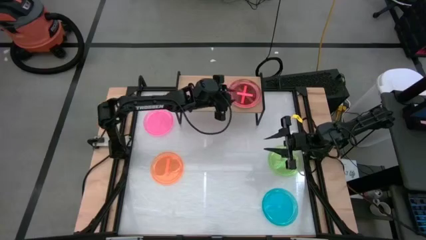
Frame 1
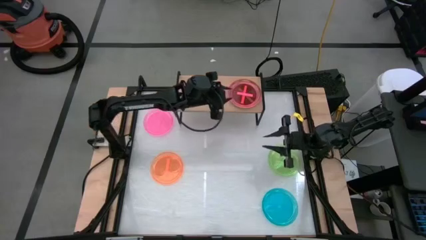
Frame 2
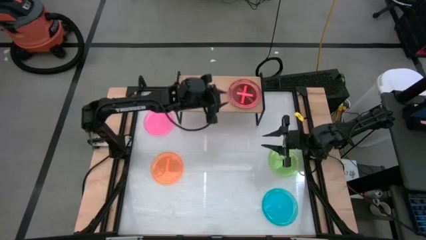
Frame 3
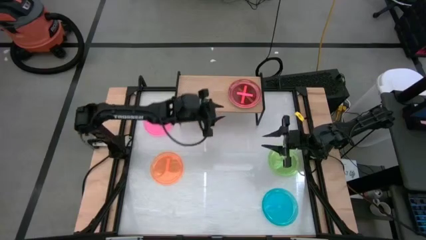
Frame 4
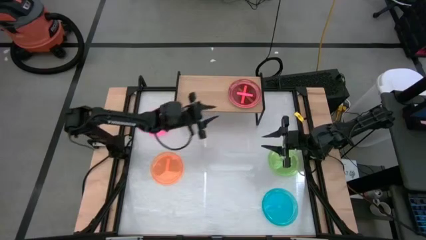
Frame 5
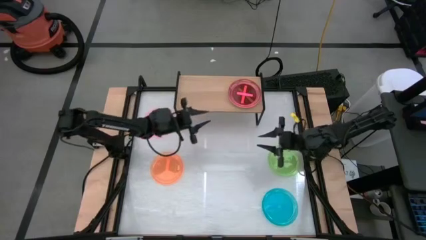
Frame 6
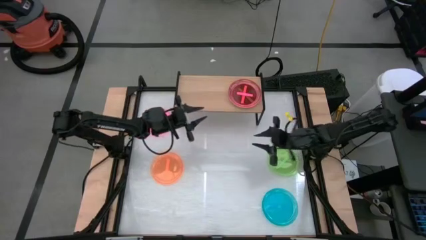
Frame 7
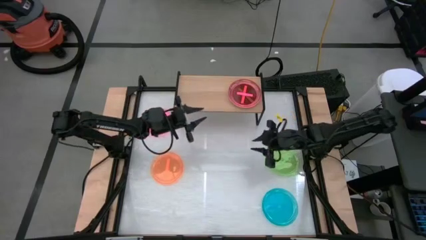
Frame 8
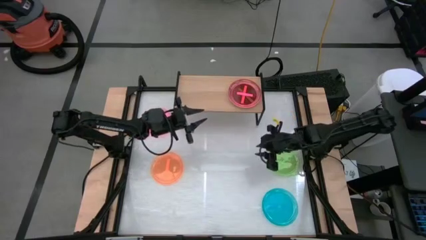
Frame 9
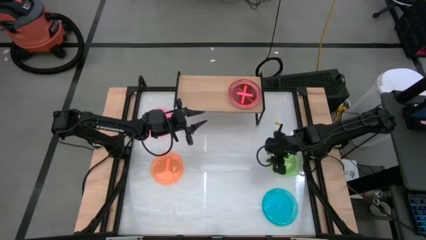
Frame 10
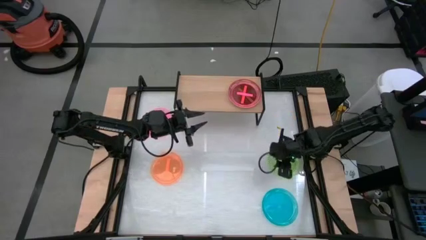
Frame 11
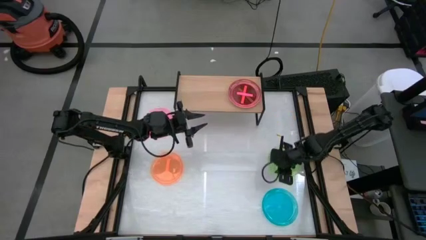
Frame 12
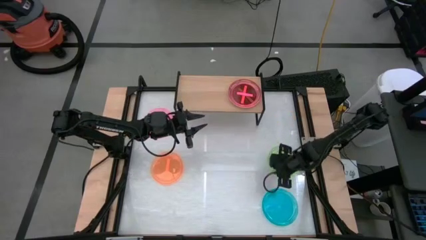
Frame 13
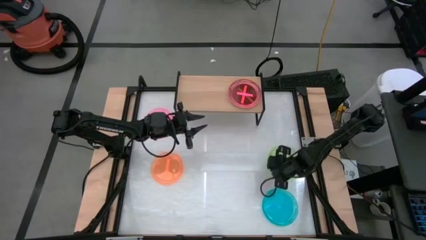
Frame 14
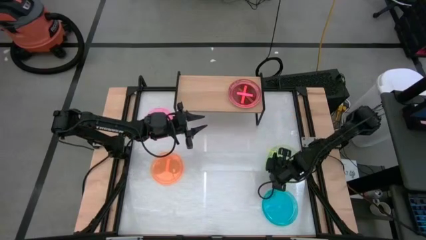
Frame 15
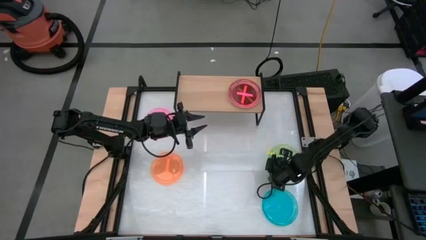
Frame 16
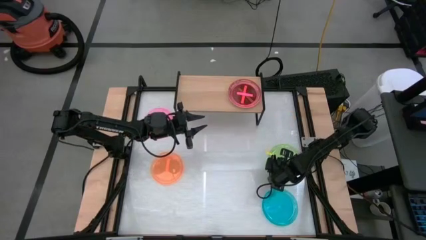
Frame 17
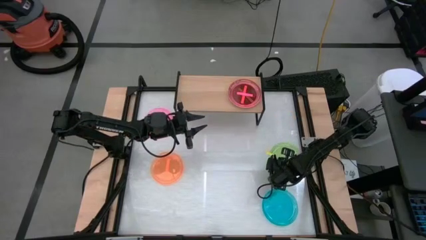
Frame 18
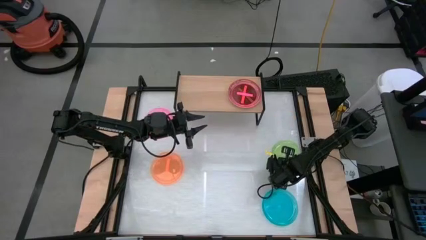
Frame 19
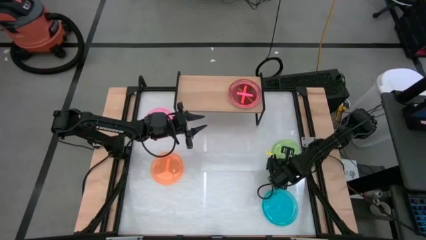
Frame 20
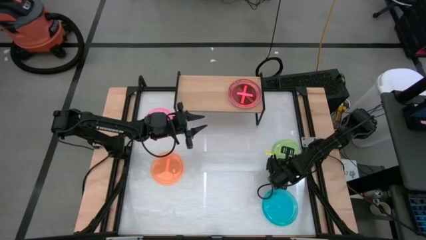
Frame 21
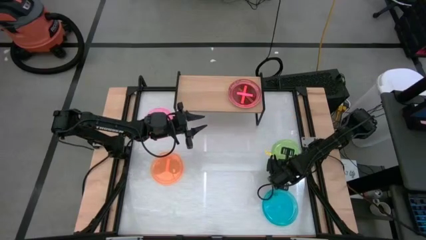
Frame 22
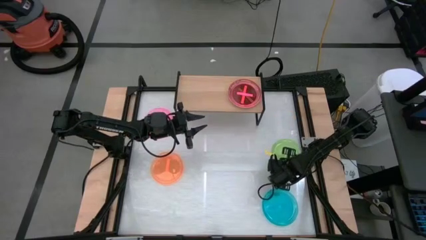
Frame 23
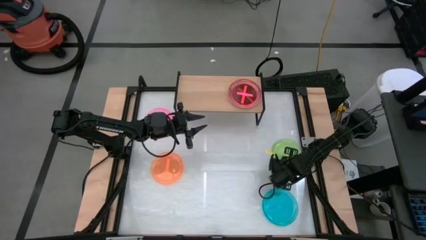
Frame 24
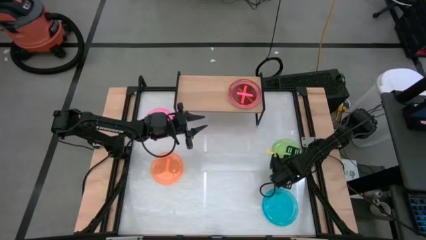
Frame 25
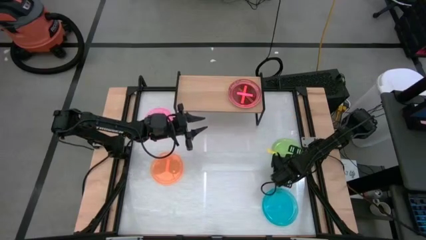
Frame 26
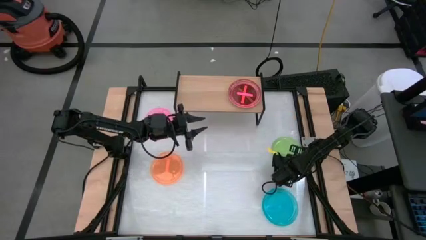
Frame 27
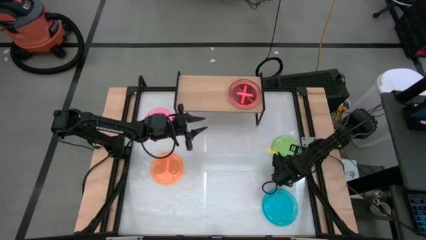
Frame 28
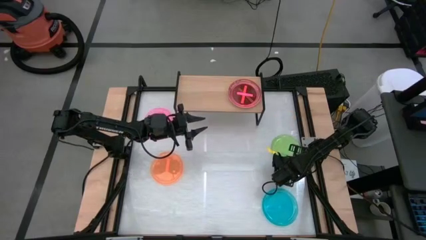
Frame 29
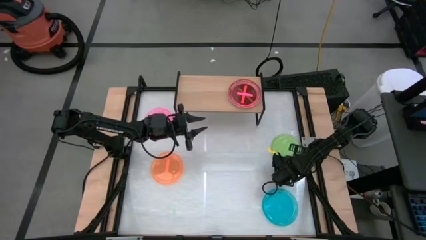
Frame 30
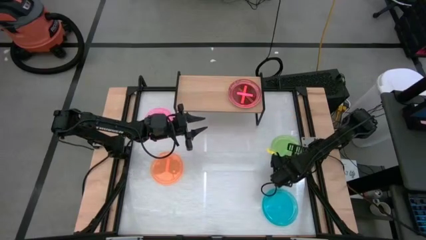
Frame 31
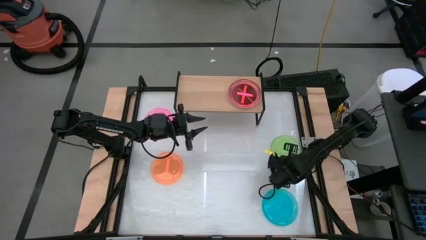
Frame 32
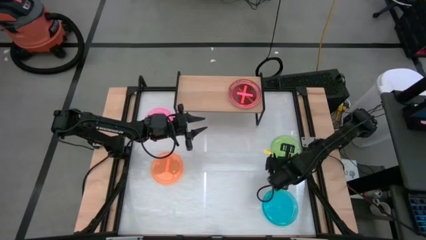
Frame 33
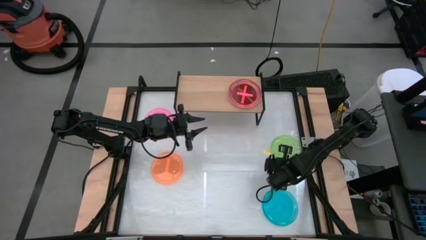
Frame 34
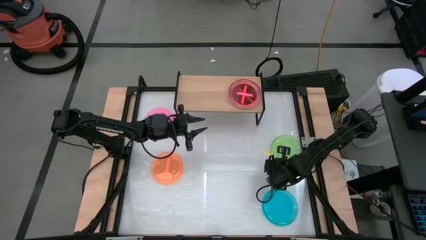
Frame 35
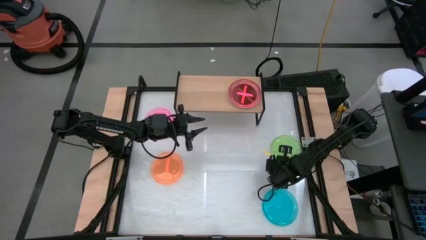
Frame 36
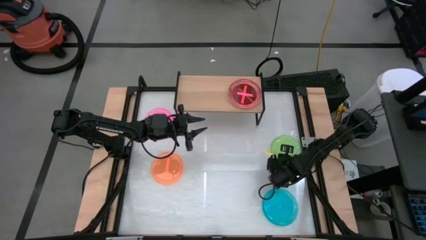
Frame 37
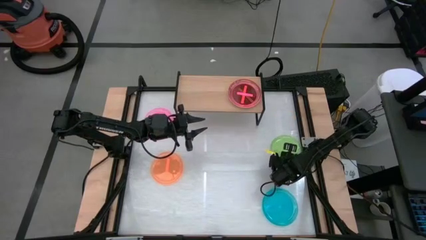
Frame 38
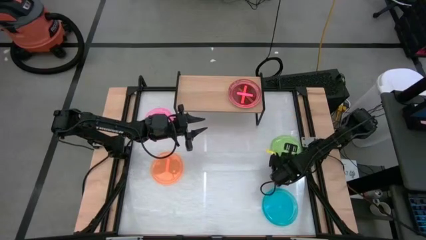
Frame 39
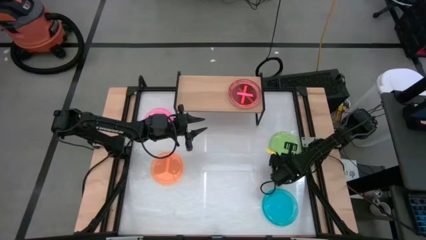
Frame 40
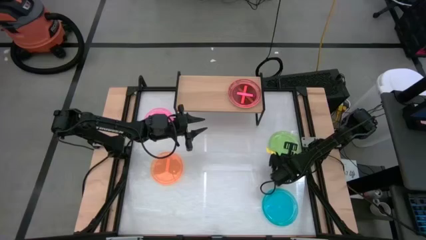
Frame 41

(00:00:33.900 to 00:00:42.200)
Task: Place and stack plates onto a shelf
Put the green plate on the shelf

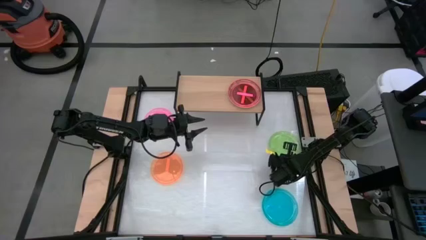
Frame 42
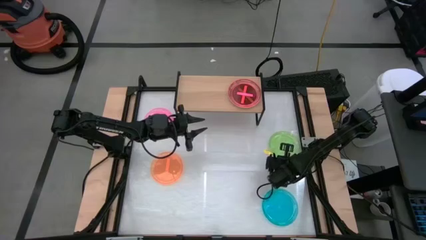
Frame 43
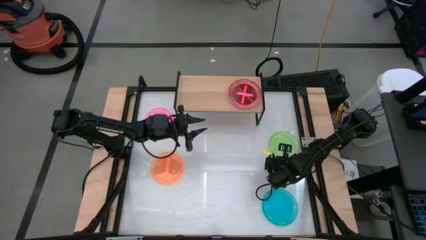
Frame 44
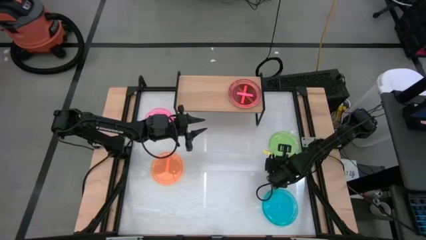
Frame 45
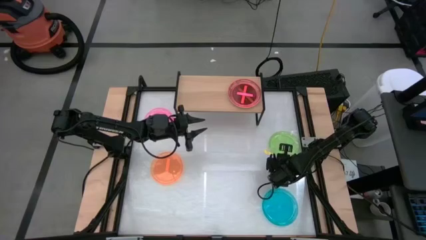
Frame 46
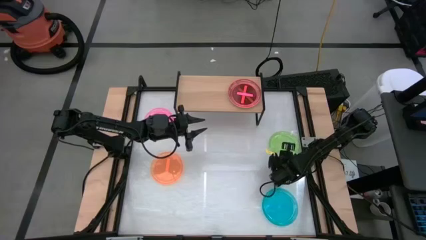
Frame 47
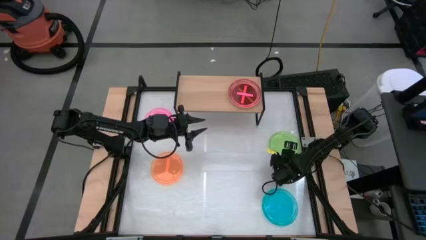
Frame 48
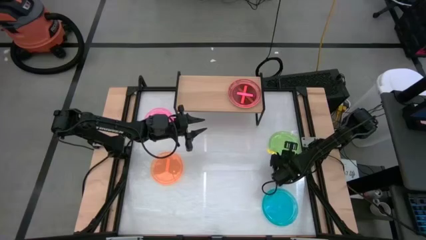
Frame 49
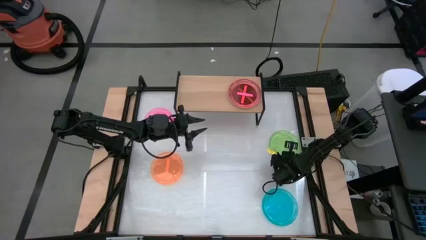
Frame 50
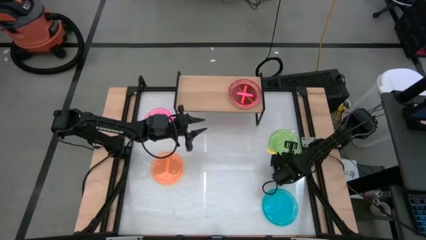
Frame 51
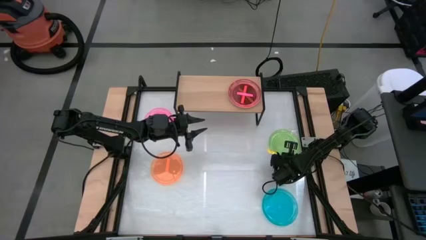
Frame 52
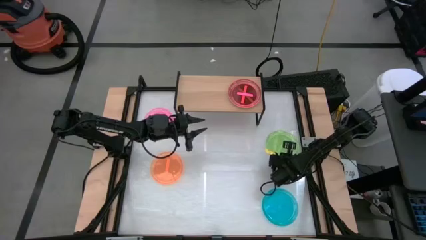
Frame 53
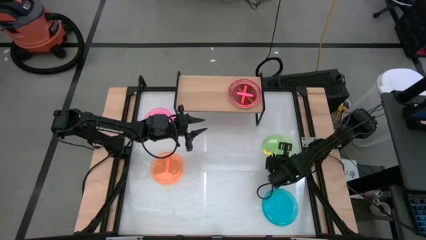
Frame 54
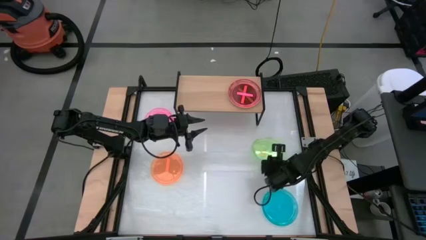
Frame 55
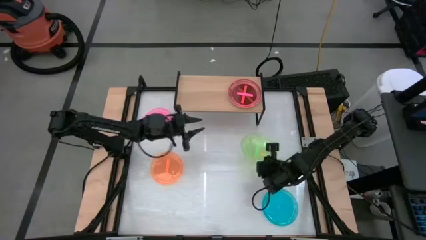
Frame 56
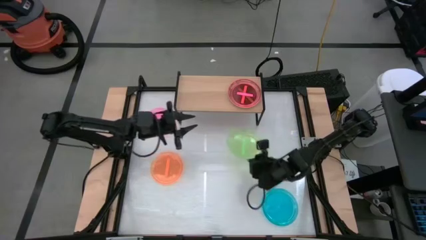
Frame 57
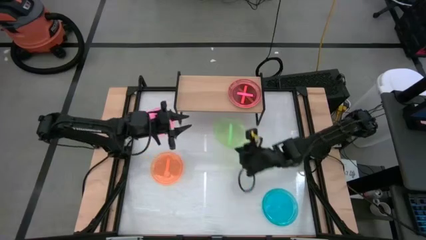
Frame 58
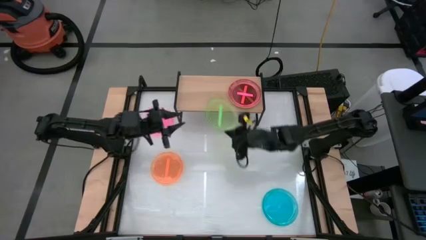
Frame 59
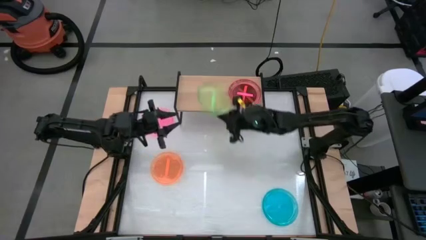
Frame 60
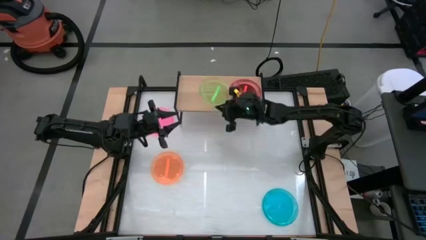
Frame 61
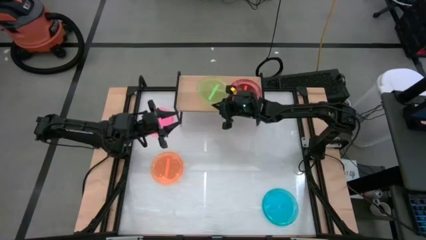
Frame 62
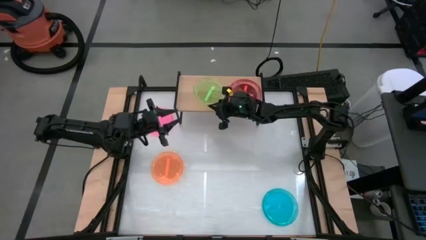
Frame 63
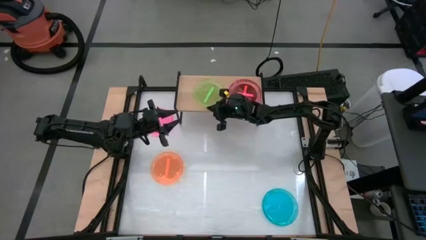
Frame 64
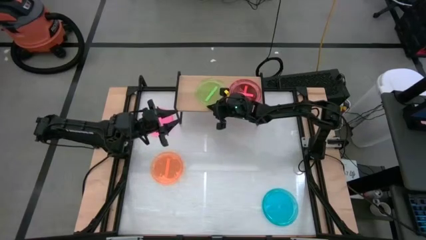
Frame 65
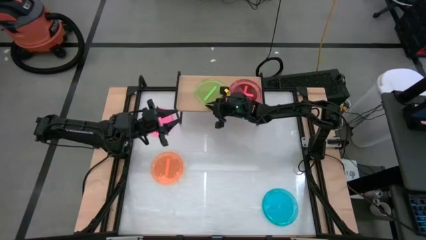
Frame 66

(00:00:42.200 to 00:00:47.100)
Put the green plate on the shelf

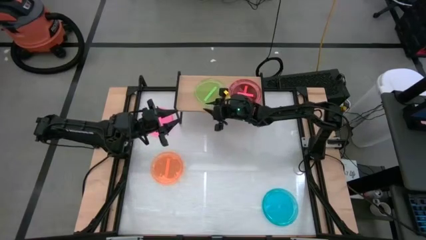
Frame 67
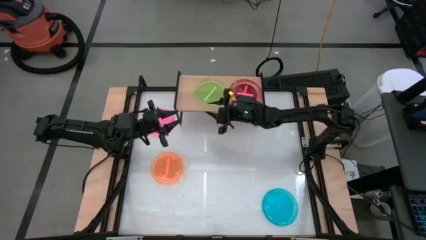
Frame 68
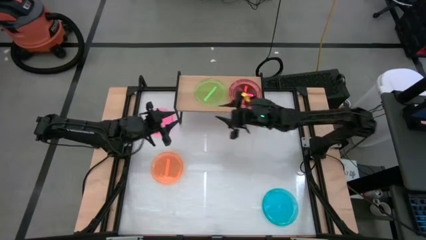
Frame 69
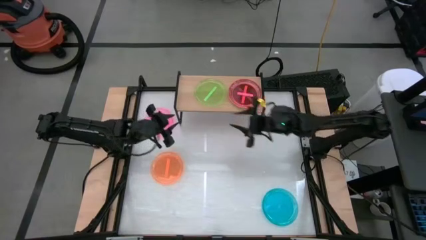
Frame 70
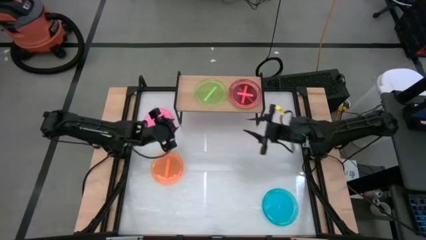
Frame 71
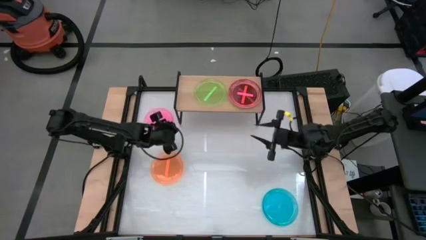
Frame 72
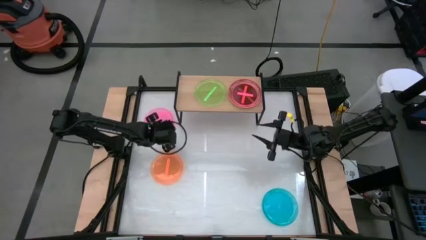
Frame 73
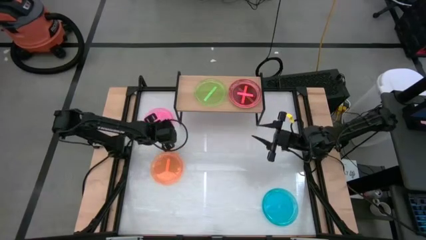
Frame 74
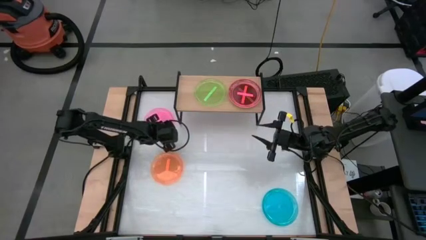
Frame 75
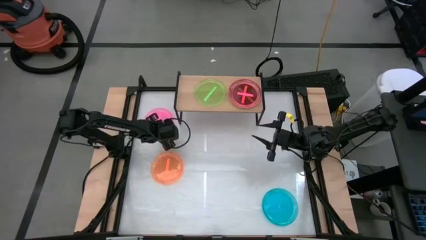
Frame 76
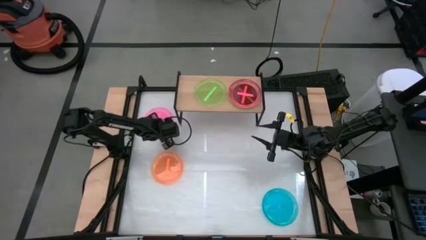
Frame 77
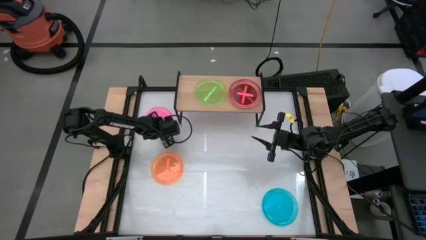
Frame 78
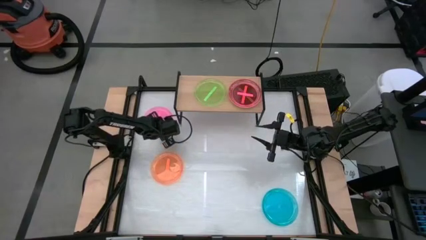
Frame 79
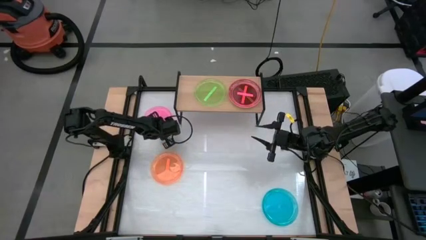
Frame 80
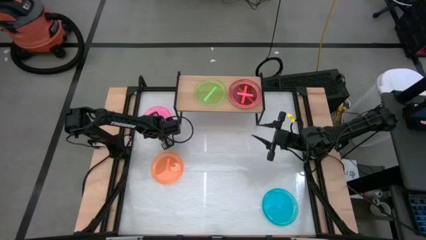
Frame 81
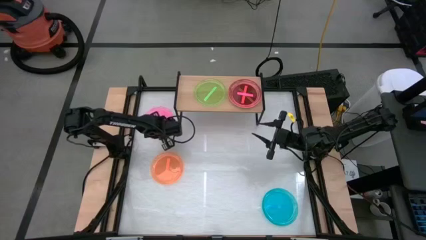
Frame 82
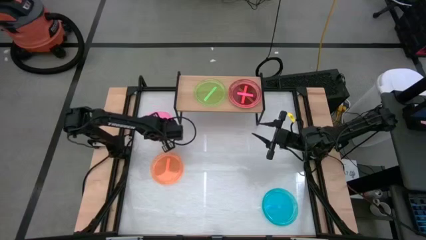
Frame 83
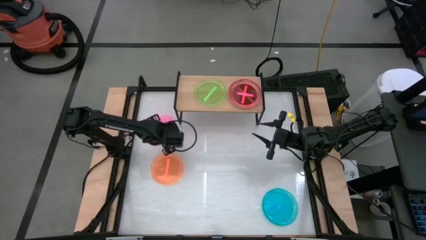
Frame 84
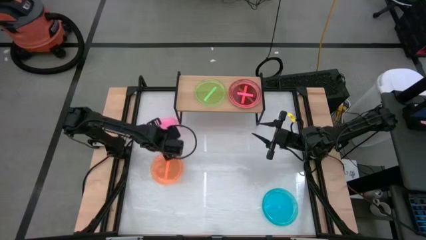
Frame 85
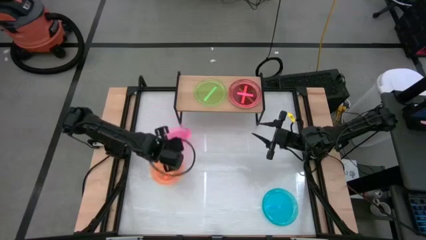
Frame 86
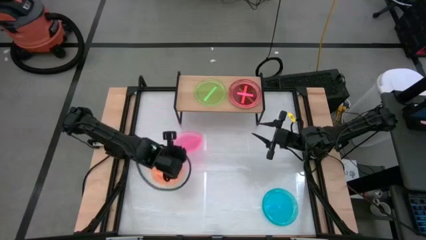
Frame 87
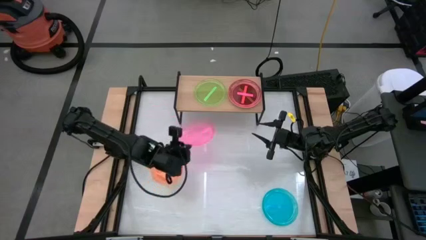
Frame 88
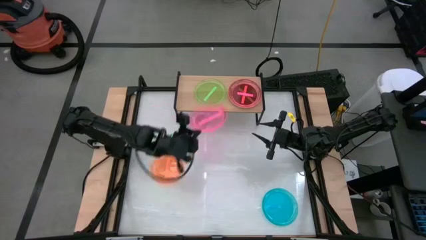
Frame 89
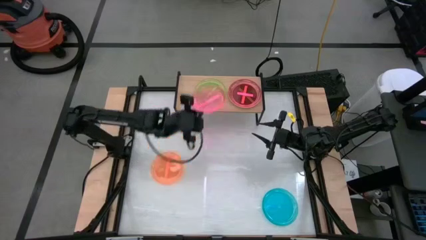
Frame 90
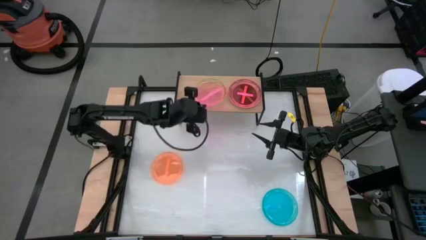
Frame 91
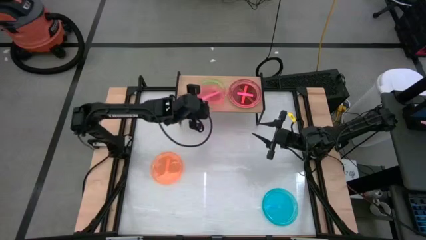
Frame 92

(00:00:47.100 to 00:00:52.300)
Stack the pink plate on top of the green plate on the shelf
